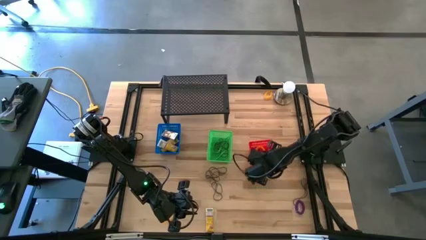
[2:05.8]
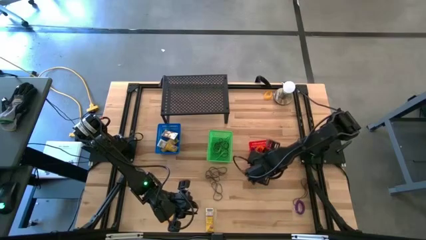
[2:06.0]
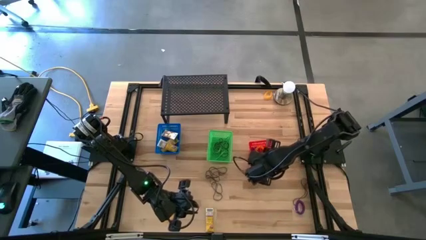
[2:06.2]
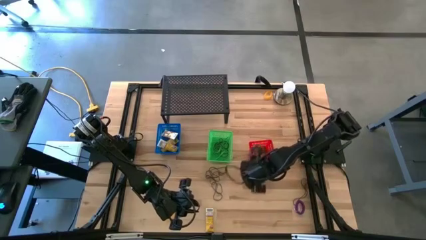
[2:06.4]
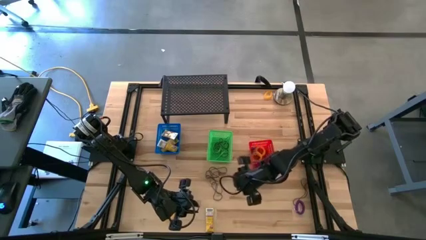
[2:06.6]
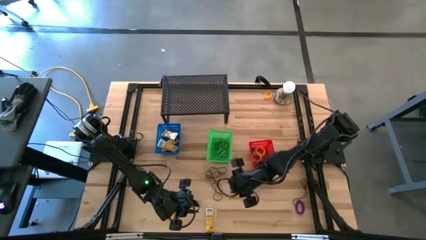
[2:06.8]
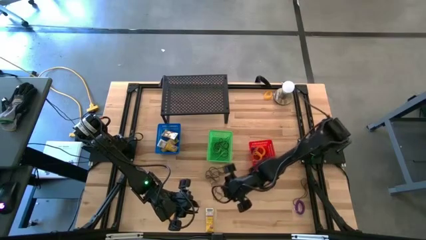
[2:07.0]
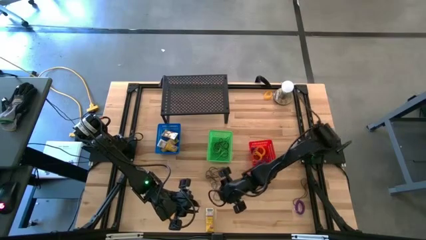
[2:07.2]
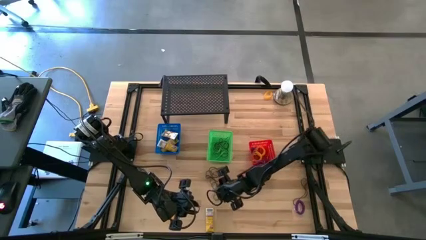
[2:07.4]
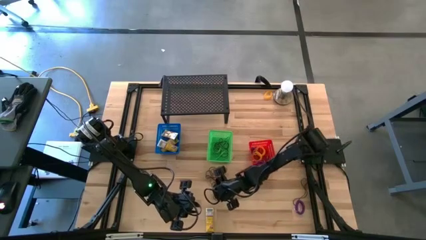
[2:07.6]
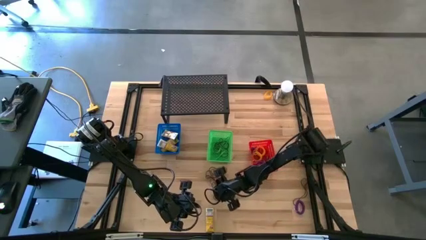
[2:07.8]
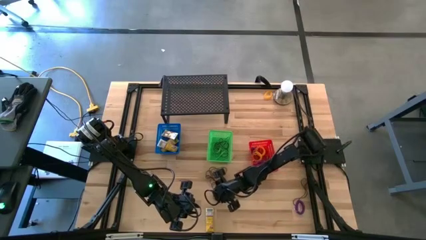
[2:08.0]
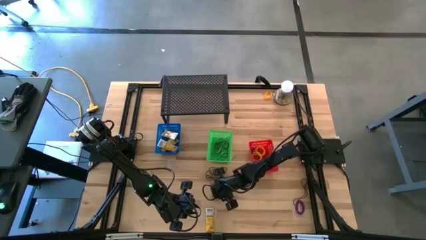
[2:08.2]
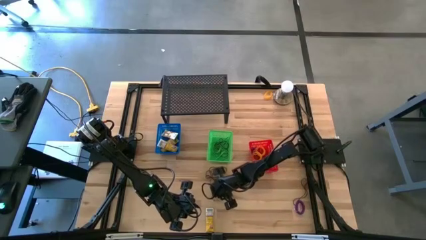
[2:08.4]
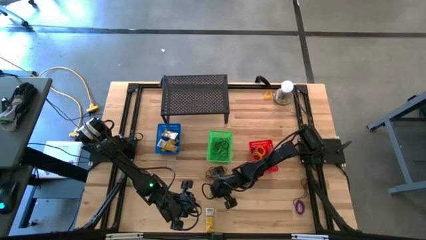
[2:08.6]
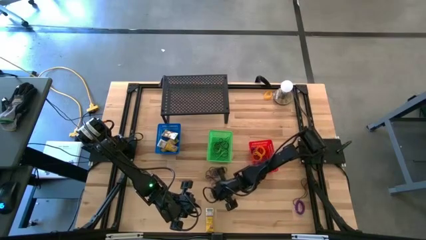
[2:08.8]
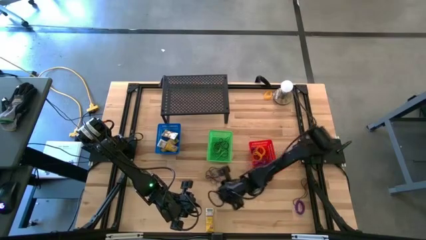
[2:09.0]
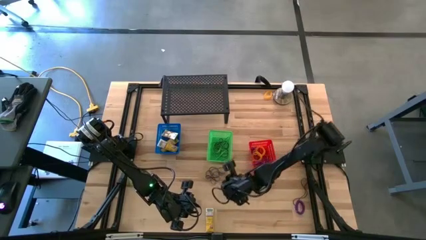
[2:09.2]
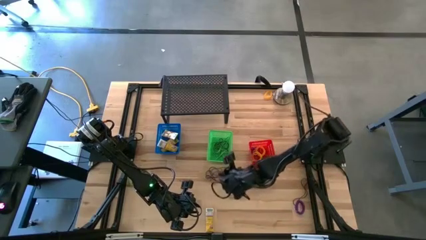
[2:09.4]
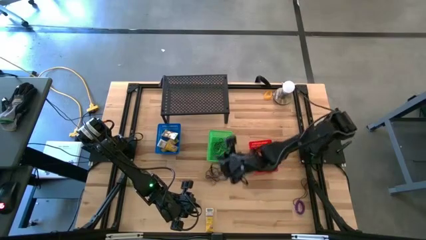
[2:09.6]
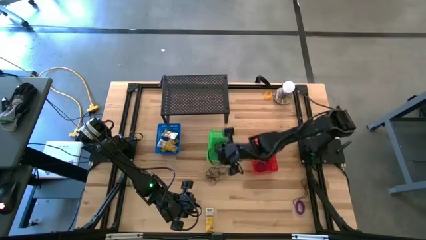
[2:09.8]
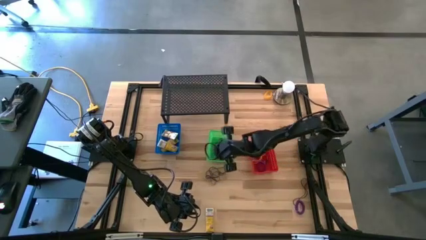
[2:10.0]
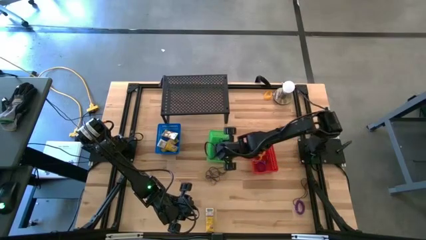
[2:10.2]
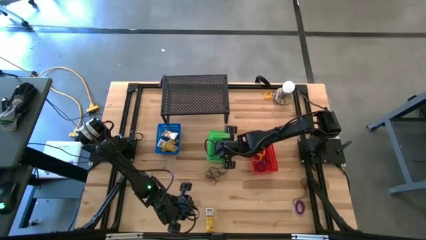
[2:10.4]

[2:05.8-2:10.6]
Task: Pick & Place Office Desk Supplies
Put the black rubber band into the green bin

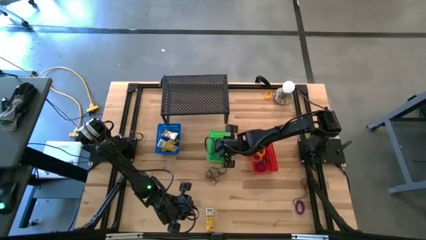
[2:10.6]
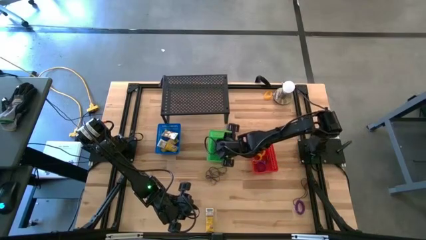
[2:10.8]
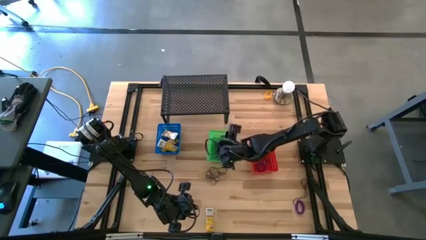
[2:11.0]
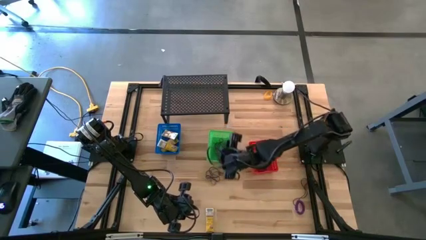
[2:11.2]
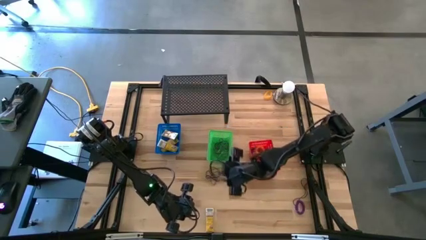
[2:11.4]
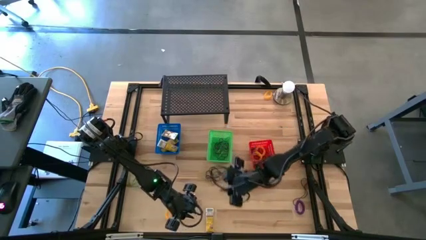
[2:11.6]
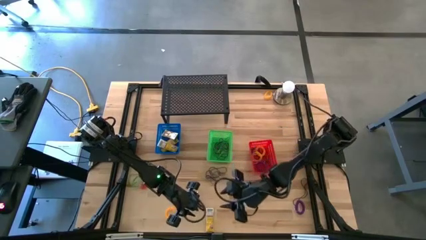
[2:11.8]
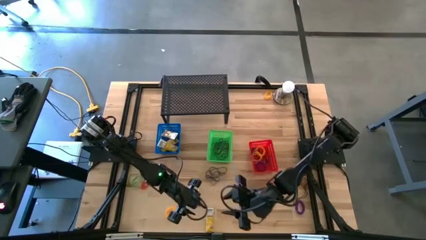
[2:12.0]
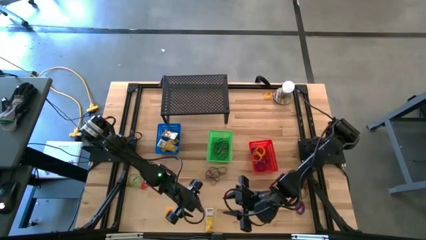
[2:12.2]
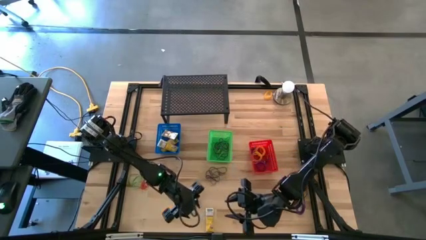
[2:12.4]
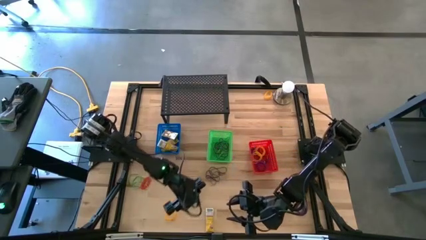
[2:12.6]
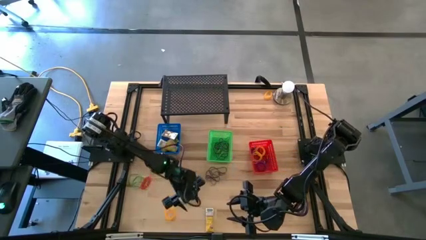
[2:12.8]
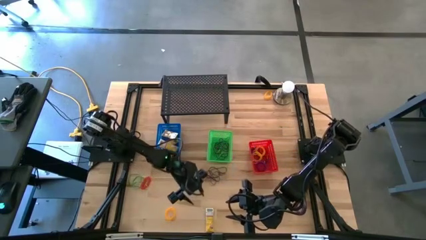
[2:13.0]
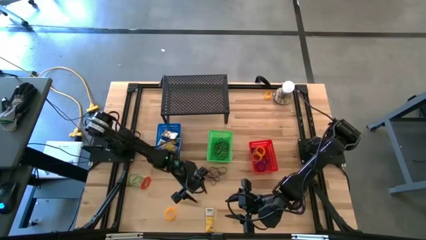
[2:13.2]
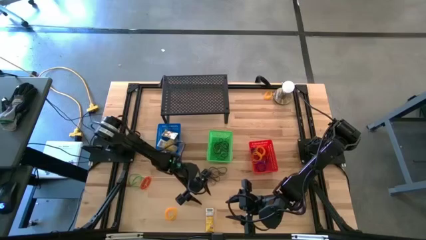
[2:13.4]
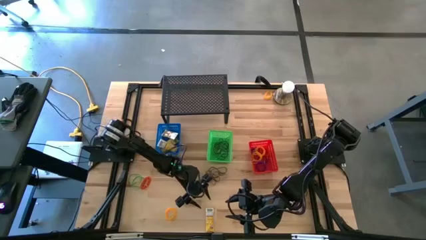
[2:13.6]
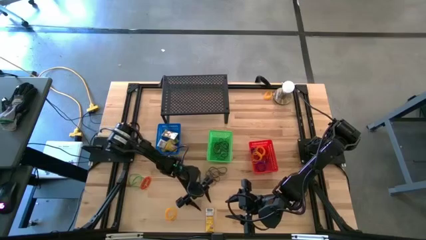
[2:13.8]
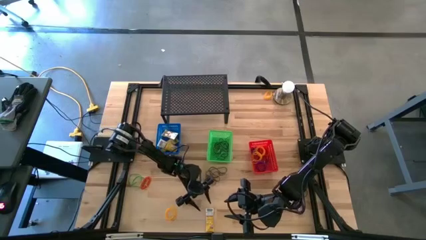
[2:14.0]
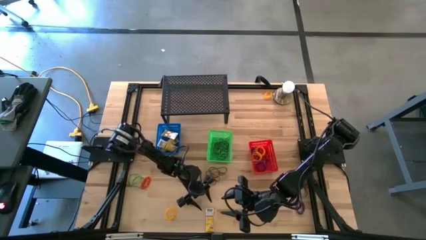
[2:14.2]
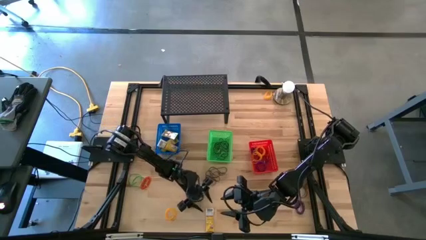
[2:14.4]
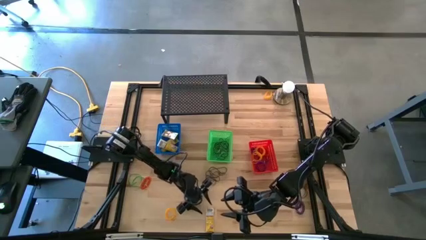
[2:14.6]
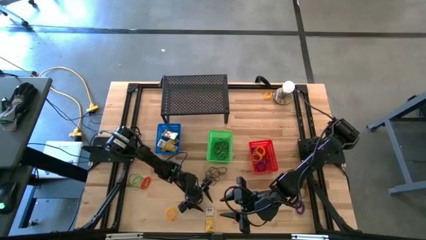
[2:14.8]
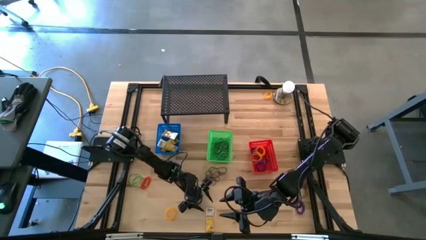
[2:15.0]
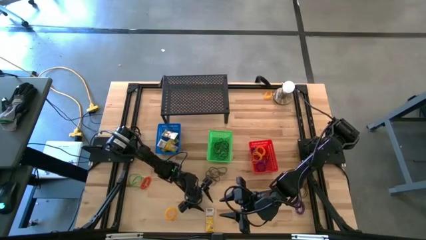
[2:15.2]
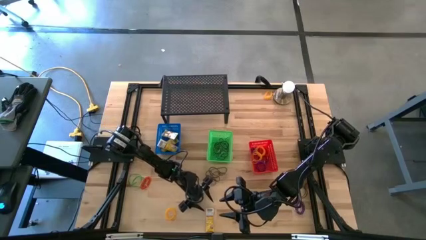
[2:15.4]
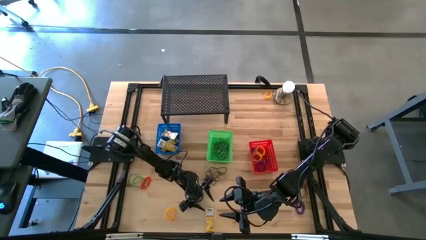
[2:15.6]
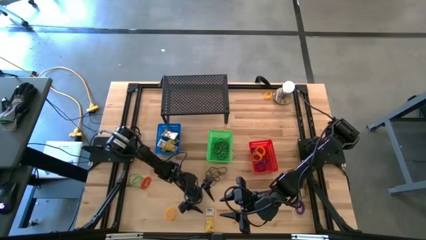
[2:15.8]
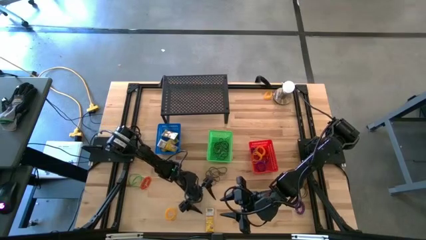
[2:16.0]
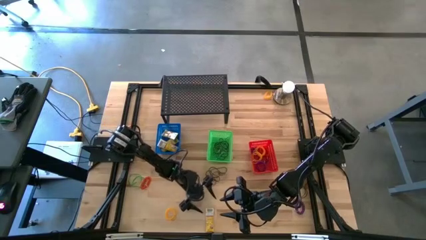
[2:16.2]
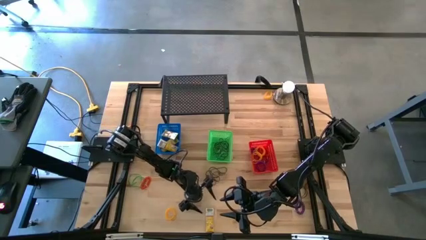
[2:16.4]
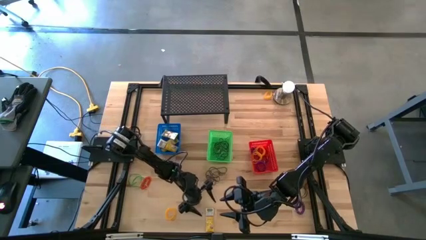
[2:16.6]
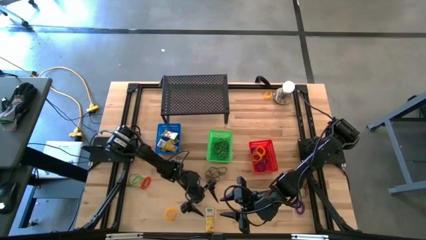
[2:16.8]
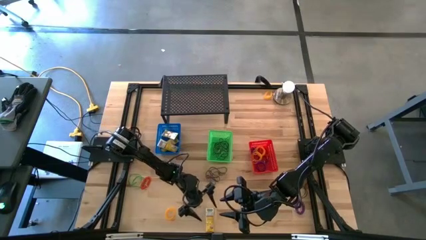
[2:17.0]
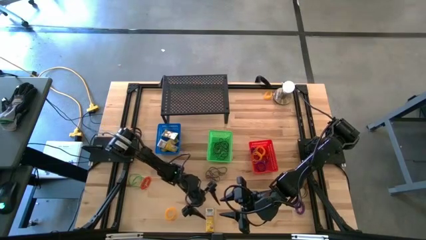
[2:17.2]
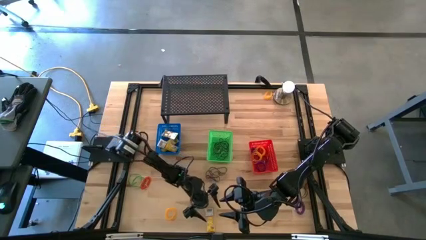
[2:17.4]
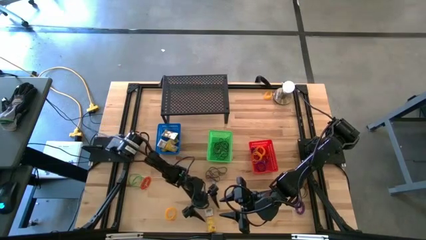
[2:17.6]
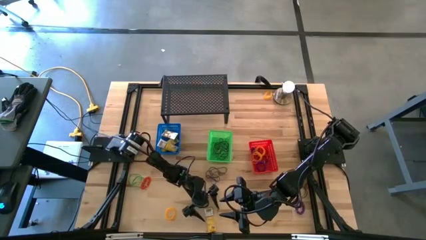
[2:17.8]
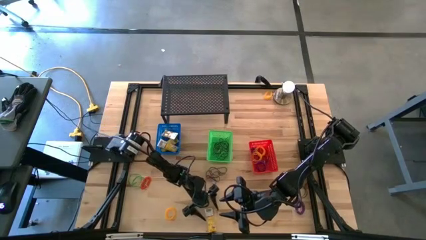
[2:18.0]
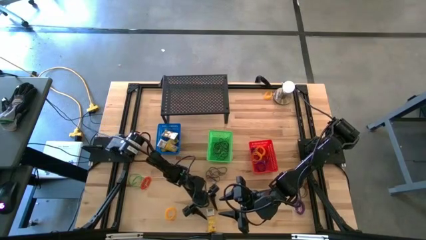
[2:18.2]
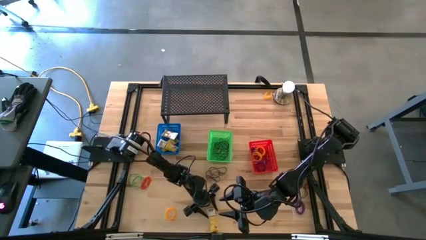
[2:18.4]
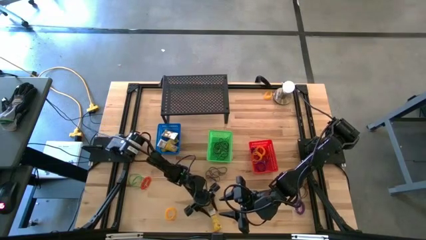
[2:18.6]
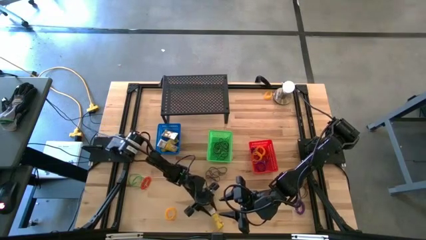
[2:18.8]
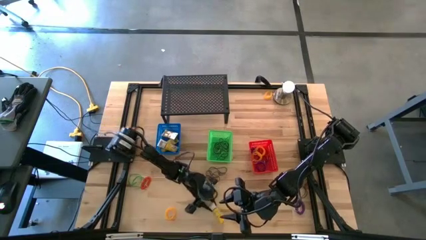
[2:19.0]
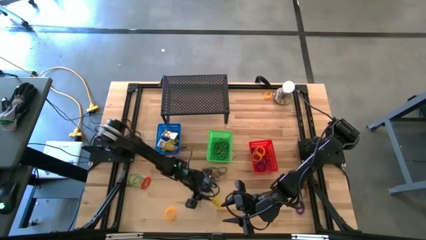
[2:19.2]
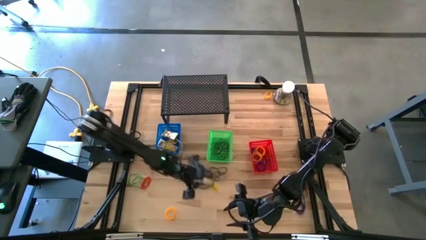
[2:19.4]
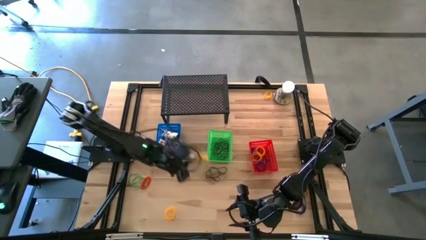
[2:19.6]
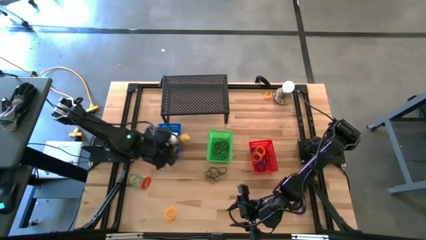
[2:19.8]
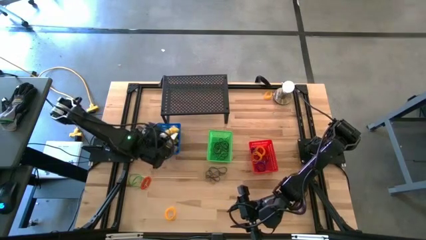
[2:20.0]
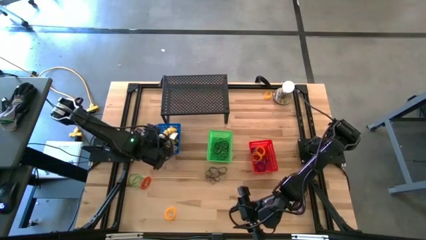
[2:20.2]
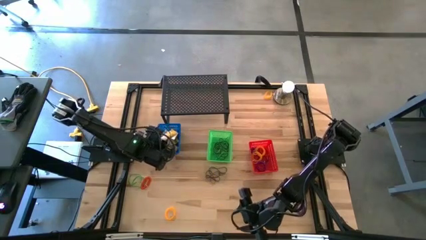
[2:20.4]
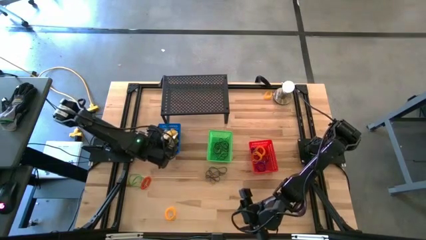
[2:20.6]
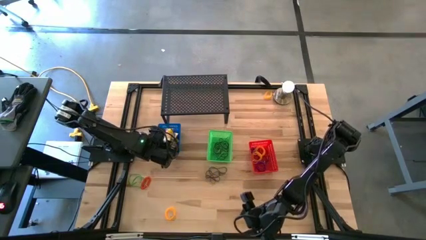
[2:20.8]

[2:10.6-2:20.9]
Put the crayon box into the blue bin

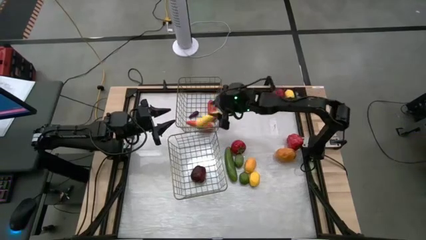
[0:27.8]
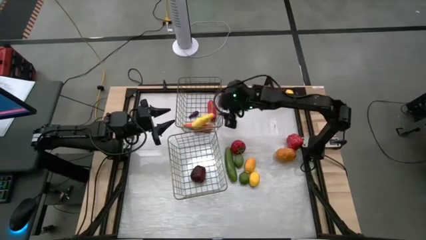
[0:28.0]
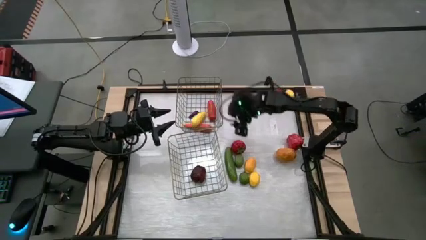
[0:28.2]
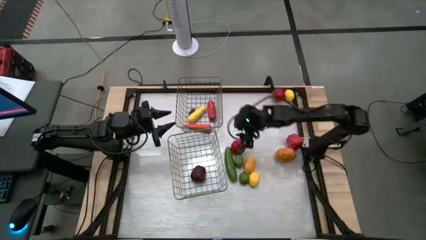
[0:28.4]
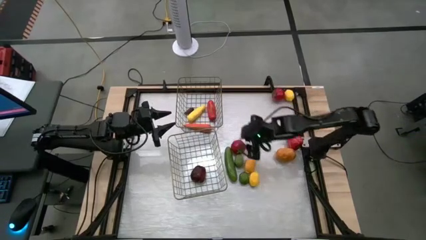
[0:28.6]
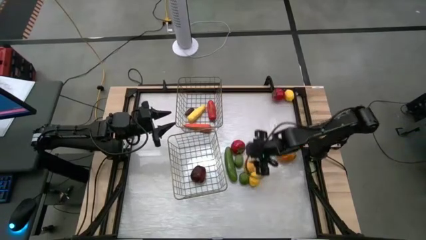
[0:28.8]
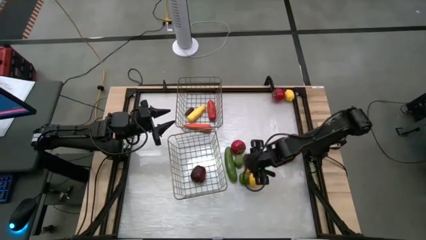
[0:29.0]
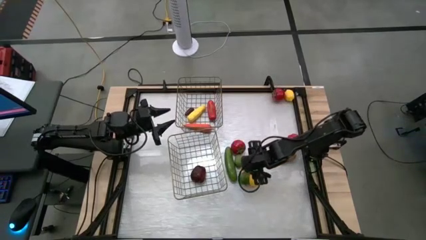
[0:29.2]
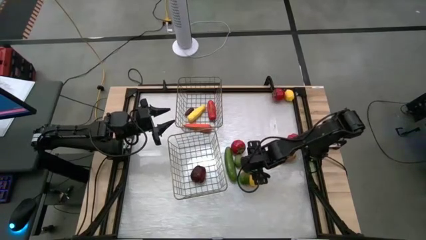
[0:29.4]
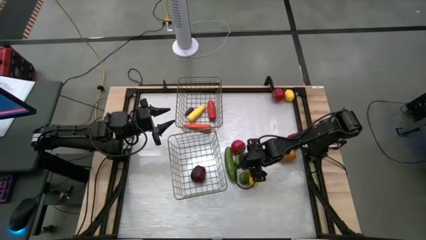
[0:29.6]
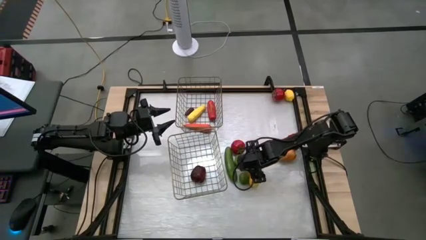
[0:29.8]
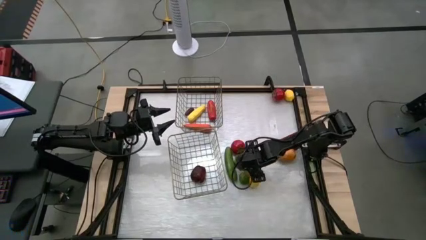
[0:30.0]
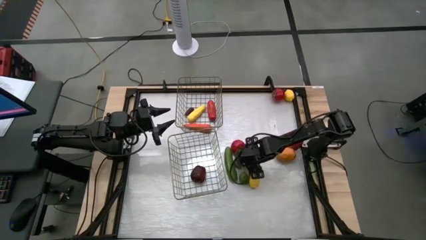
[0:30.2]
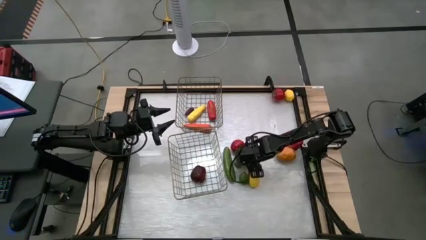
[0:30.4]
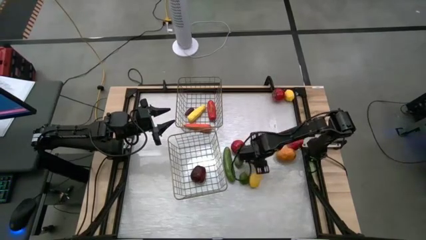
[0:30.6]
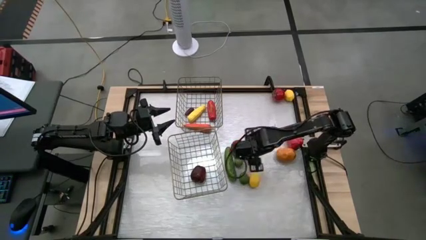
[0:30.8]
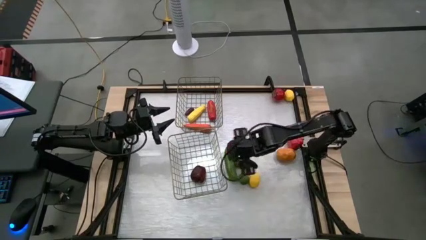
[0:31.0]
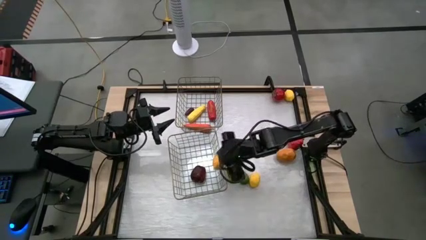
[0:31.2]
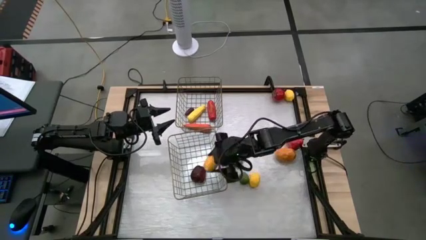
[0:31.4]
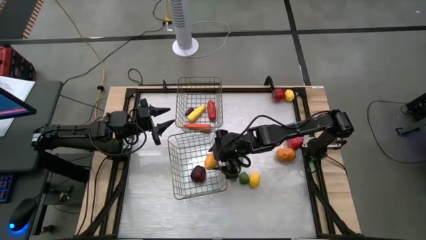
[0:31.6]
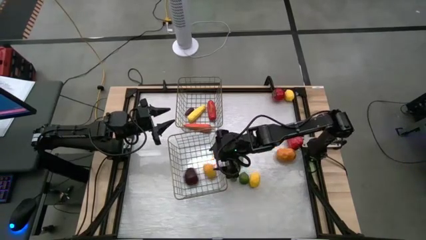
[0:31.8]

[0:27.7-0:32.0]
Task: Sort produce into baskets
Put the bottom left yellow lemon into the bottom basket
